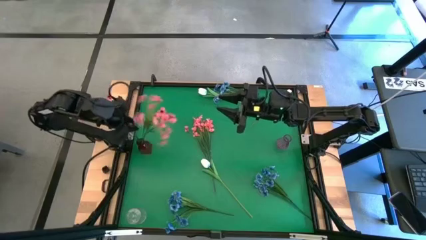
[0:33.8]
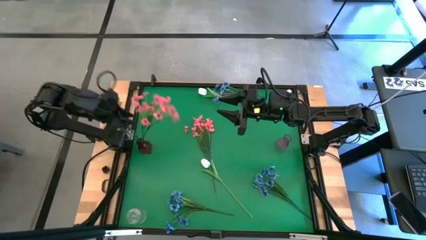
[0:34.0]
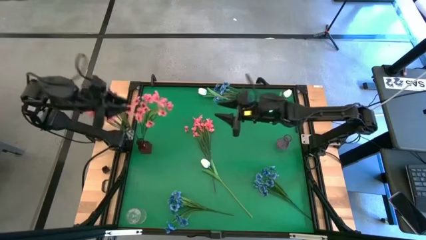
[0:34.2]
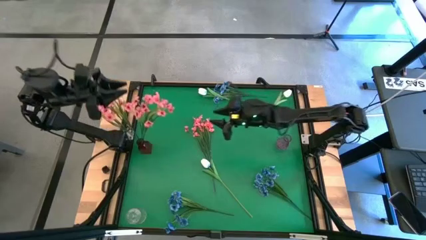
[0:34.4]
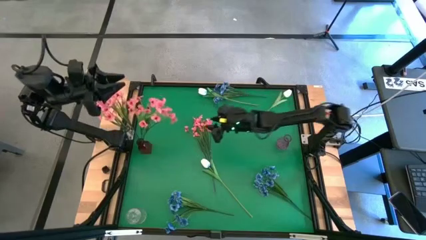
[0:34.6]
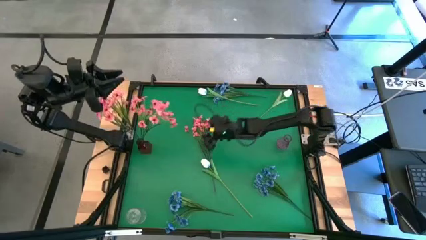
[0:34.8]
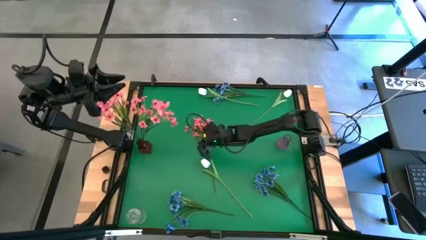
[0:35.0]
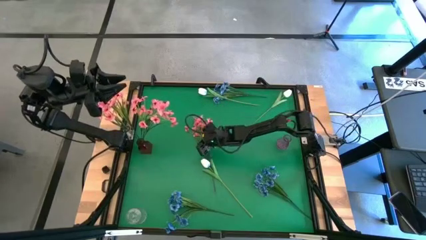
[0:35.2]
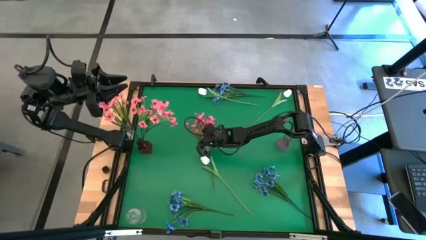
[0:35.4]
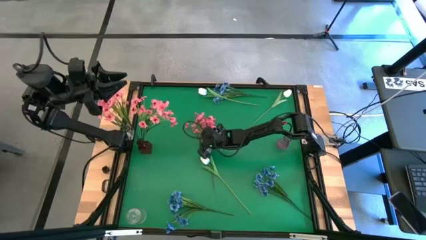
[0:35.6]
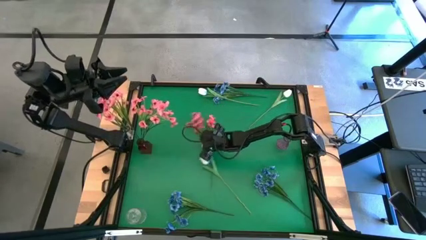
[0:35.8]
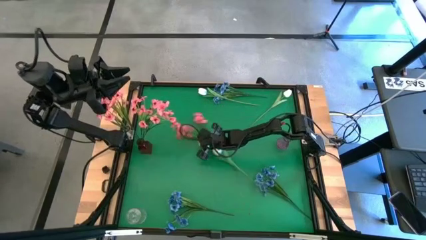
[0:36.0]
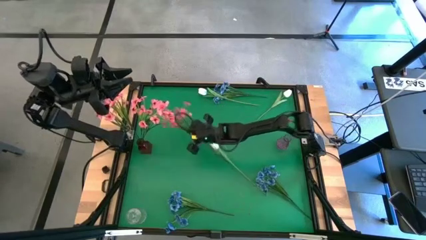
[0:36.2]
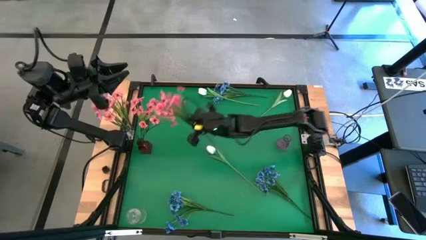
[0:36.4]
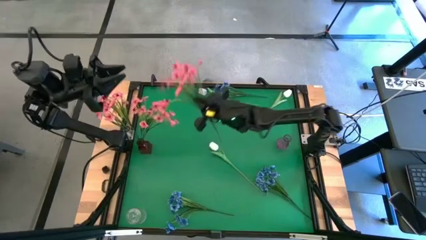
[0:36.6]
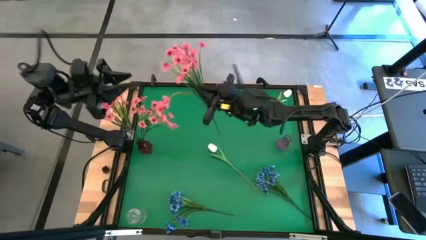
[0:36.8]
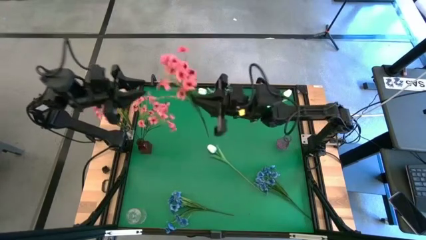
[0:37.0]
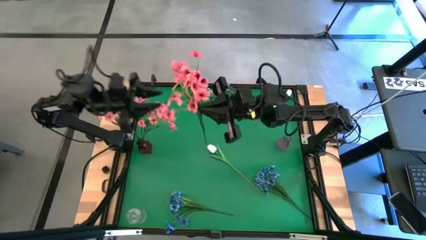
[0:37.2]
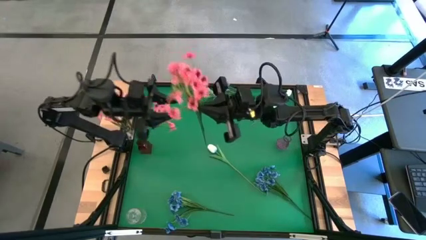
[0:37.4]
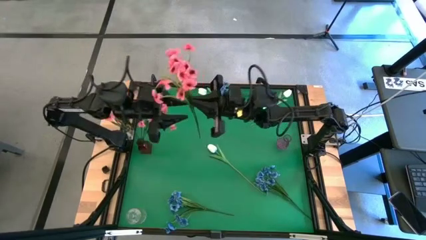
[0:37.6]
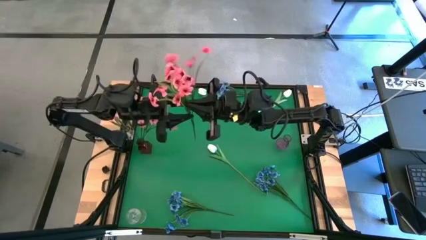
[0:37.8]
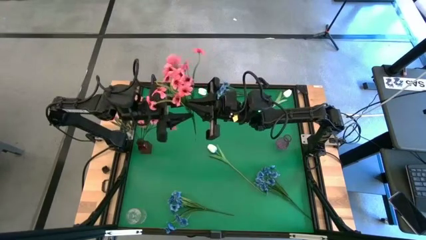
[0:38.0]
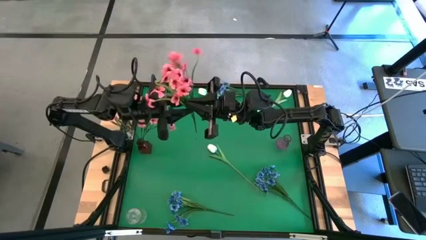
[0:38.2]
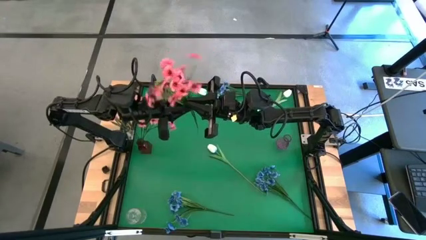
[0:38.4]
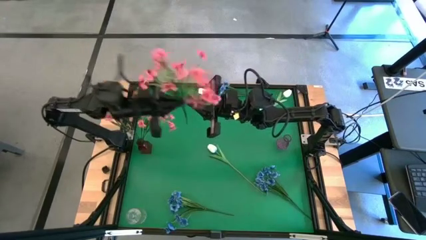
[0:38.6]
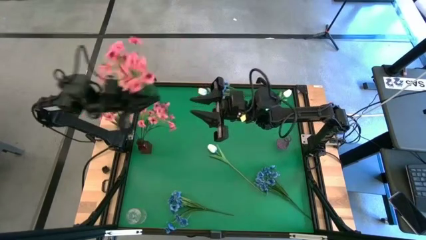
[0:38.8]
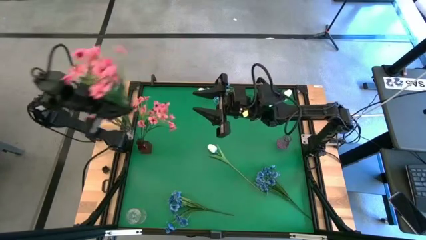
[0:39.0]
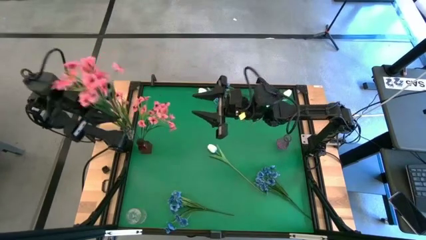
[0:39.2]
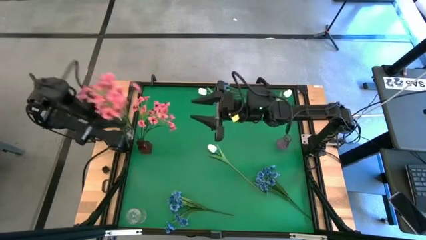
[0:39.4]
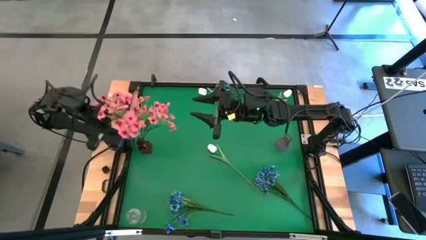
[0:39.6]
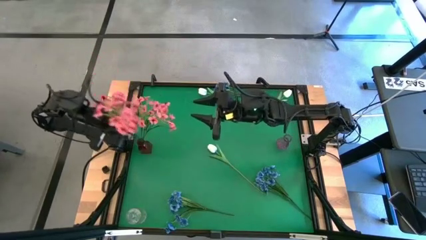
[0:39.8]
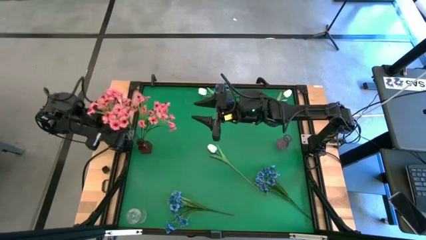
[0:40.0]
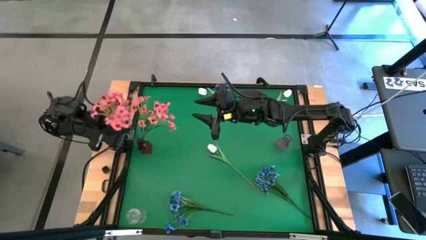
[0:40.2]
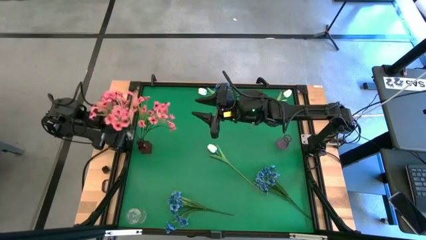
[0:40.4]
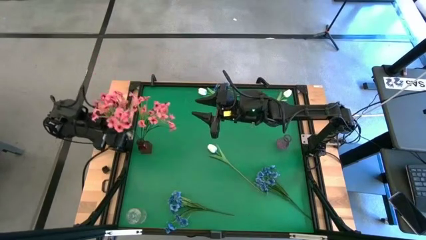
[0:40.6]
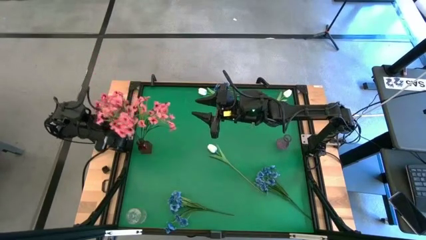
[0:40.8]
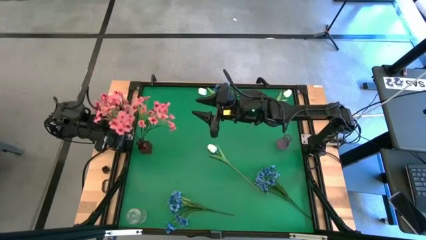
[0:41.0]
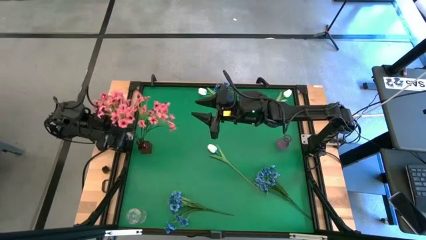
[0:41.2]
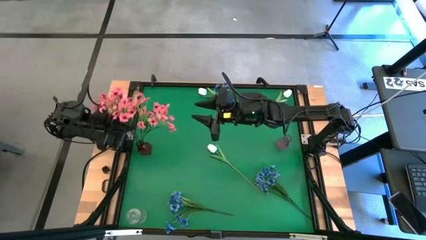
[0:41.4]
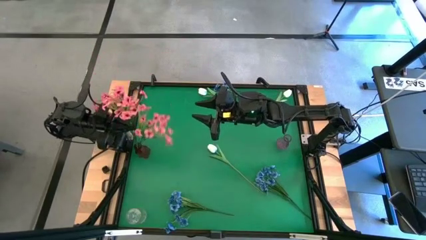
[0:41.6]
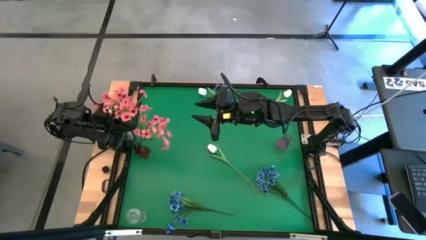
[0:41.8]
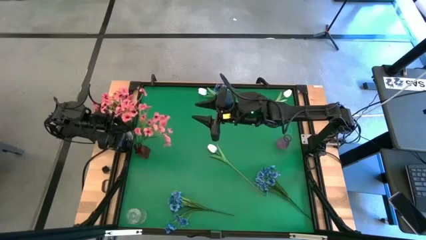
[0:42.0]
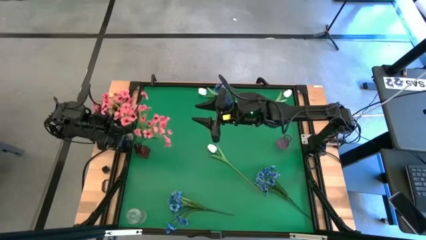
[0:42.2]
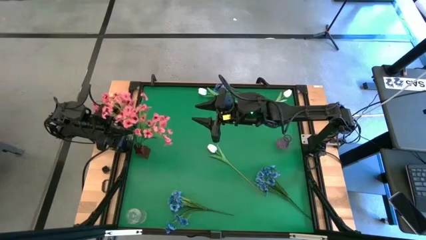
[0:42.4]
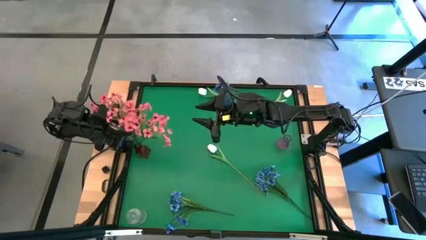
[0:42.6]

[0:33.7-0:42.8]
Task: Sort flowers into vase by color
Put the pink flower into the red vase

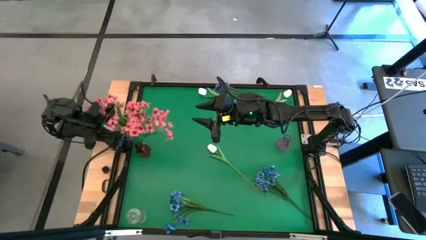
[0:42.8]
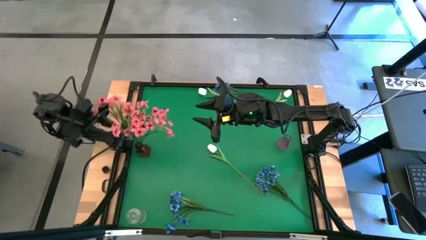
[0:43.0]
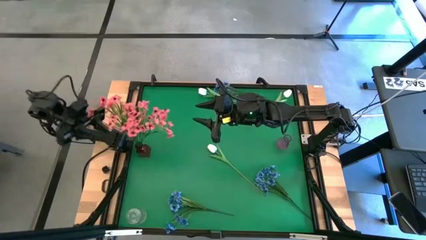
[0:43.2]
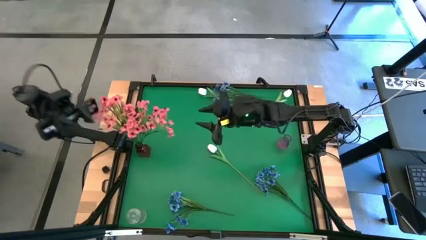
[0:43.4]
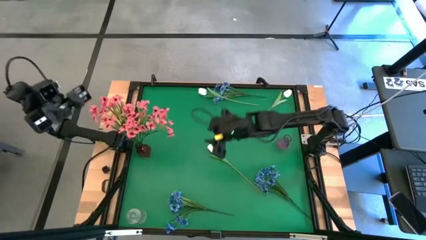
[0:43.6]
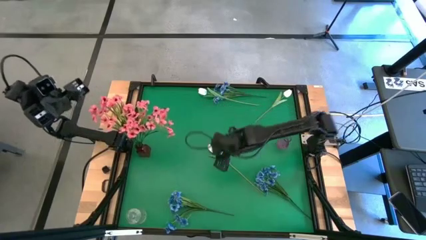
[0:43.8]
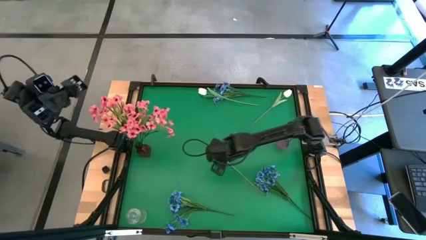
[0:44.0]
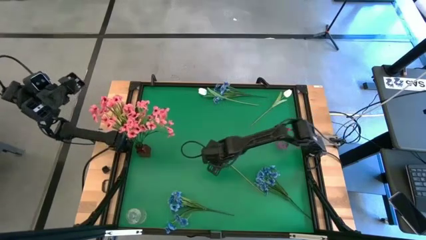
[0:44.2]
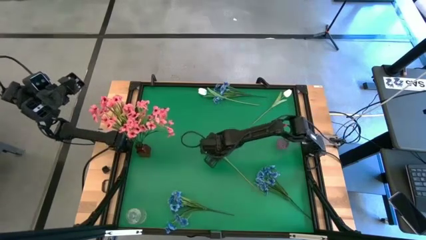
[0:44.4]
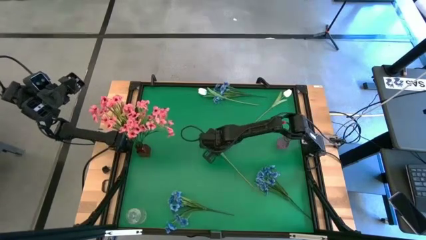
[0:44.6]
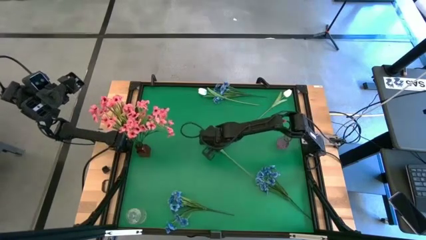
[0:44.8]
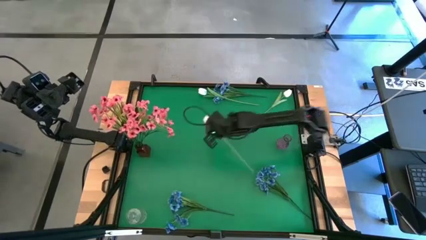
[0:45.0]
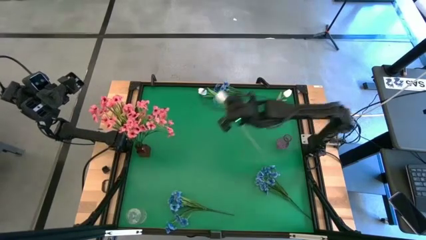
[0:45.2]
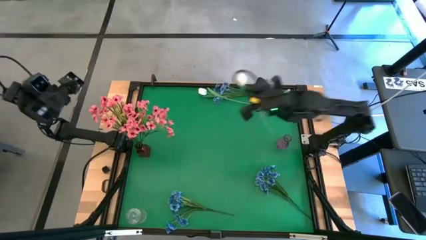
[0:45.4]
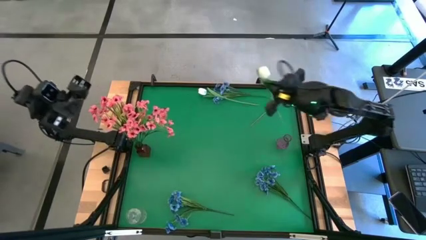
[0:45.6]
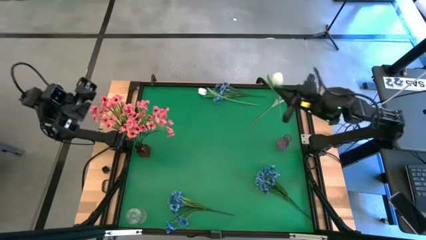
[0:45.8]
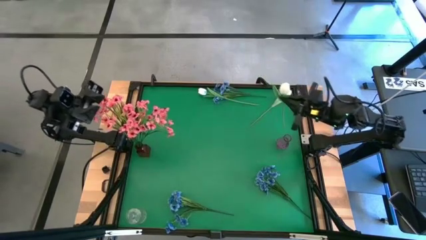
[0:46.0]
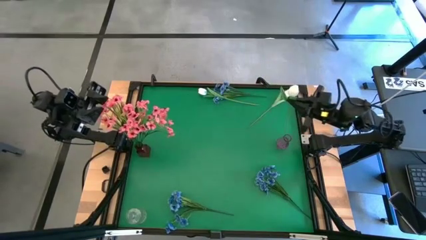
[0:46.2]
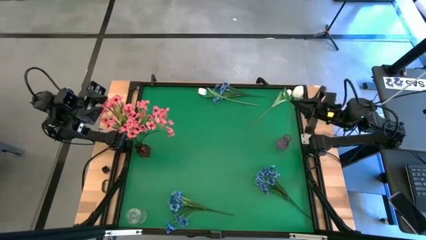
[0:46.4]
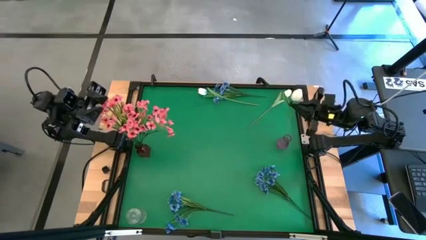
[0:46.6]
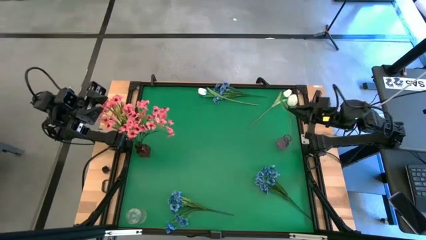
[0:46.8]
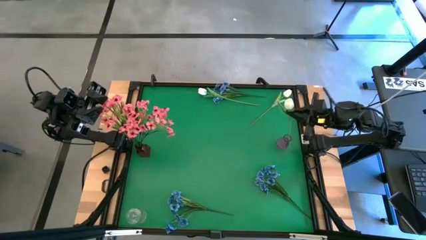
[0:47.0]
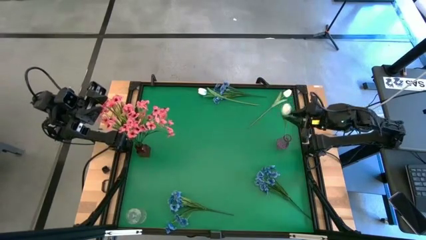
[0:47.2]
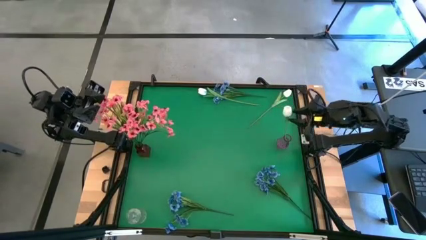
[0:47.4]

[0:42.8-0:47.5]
Put the bottom left white flower into the violet vase
